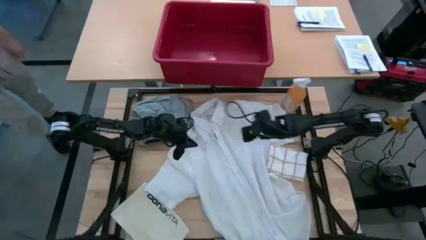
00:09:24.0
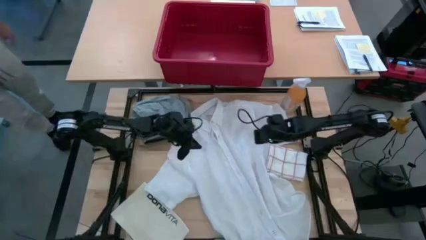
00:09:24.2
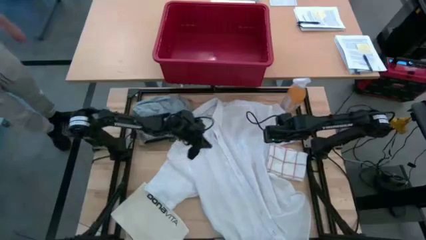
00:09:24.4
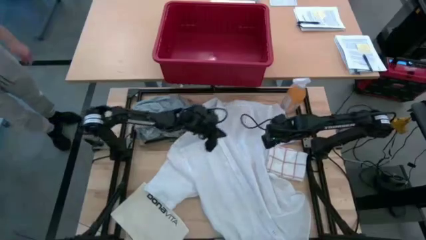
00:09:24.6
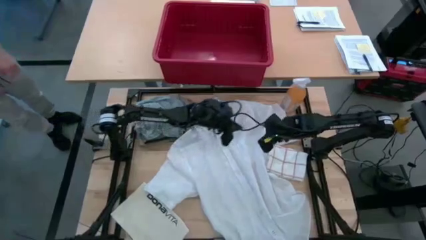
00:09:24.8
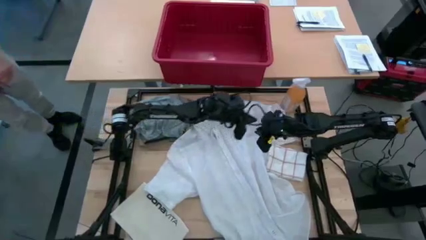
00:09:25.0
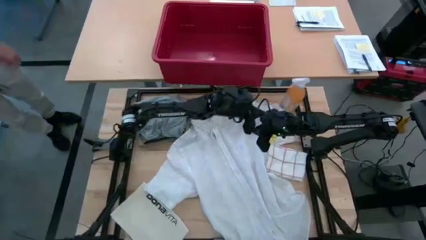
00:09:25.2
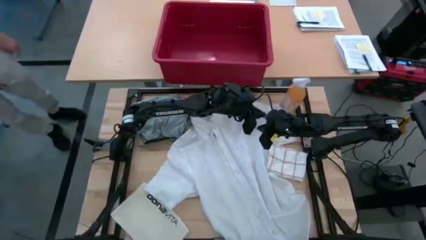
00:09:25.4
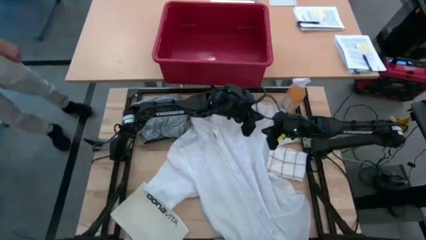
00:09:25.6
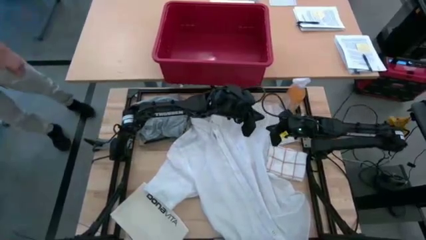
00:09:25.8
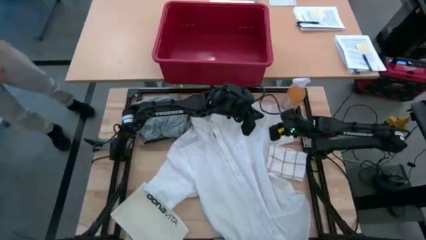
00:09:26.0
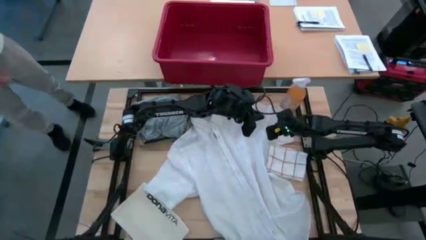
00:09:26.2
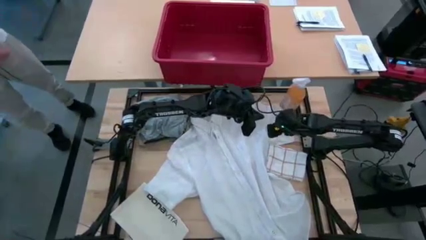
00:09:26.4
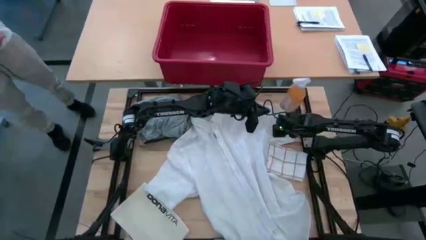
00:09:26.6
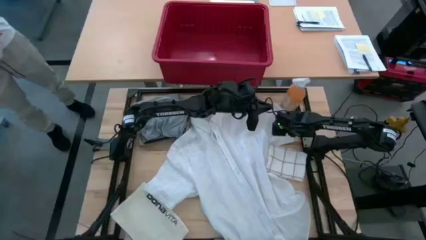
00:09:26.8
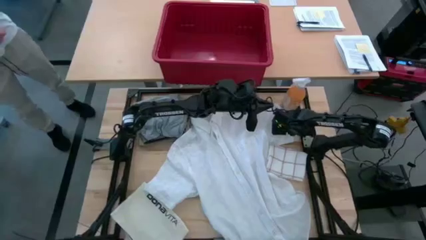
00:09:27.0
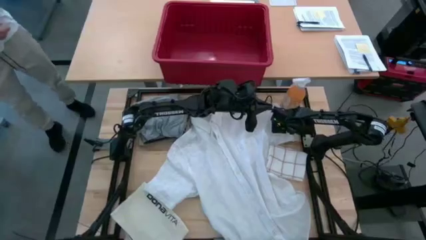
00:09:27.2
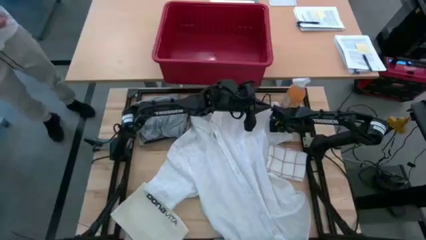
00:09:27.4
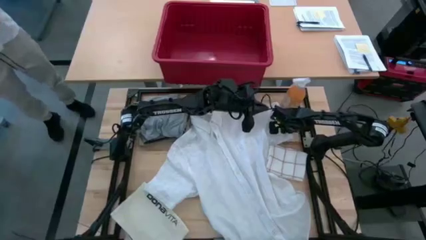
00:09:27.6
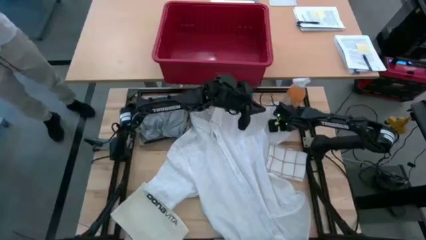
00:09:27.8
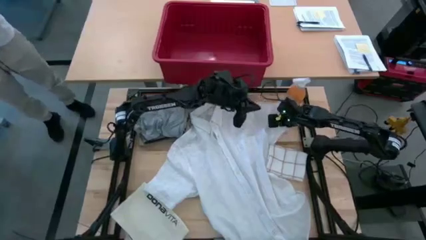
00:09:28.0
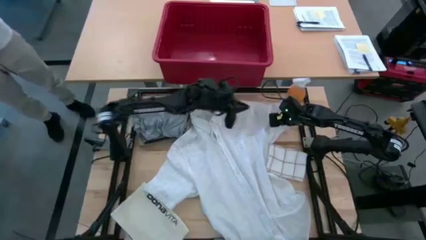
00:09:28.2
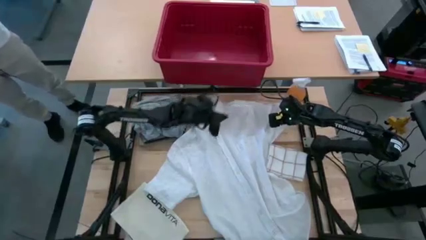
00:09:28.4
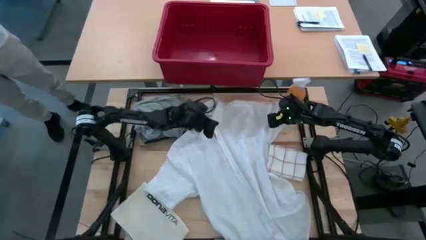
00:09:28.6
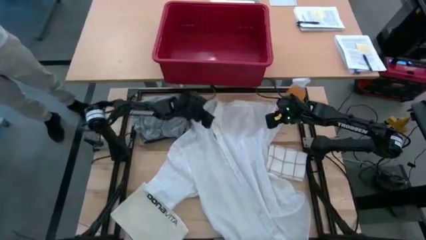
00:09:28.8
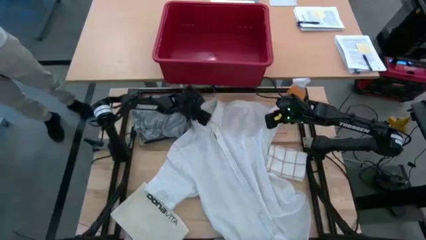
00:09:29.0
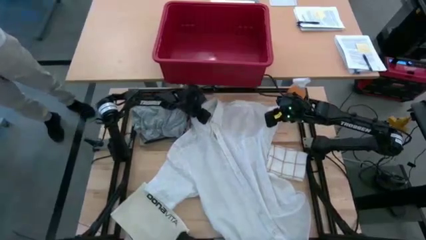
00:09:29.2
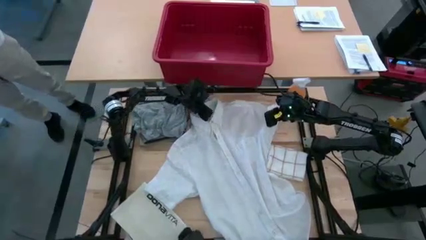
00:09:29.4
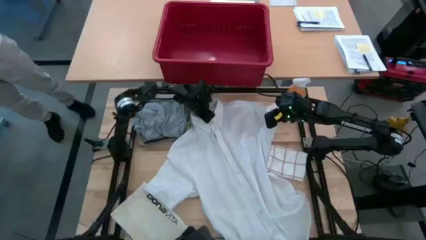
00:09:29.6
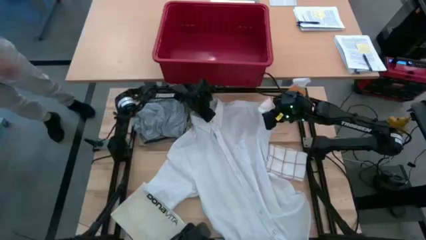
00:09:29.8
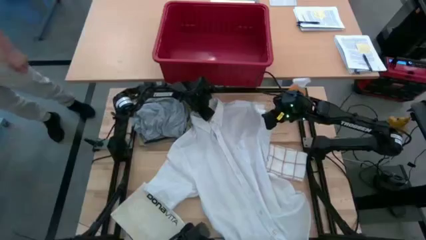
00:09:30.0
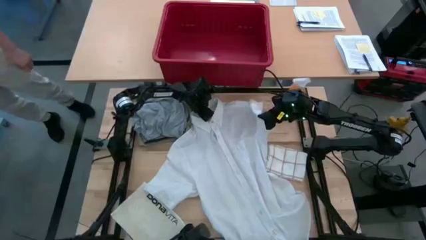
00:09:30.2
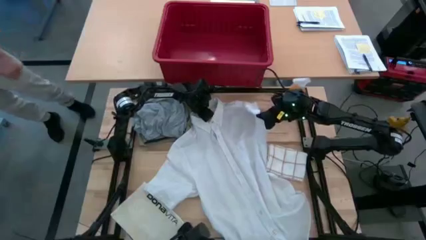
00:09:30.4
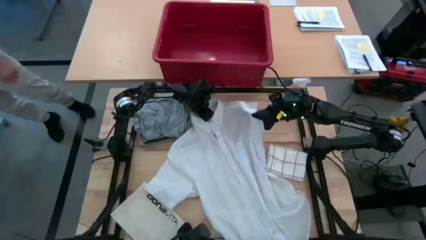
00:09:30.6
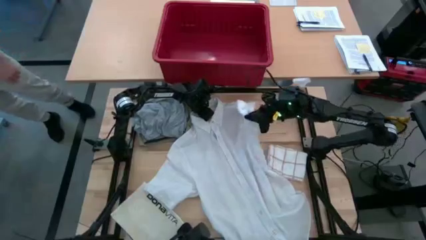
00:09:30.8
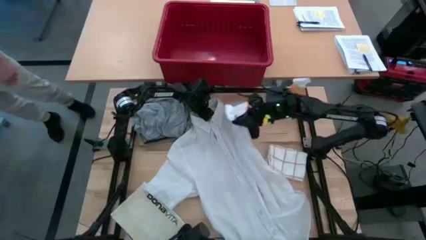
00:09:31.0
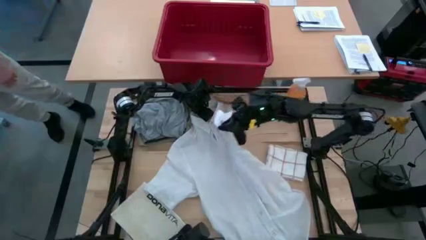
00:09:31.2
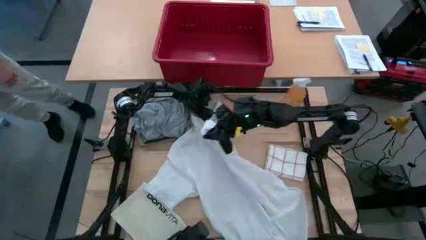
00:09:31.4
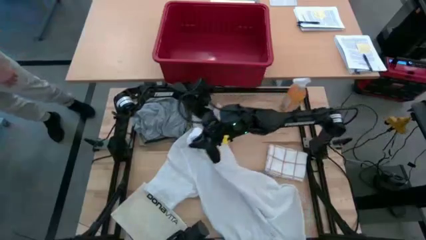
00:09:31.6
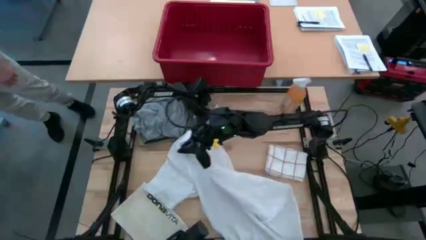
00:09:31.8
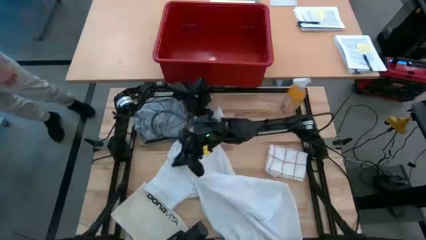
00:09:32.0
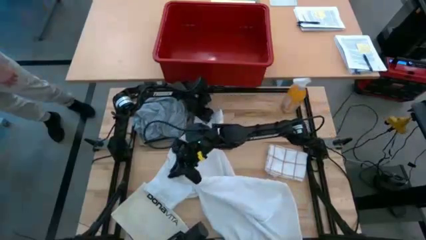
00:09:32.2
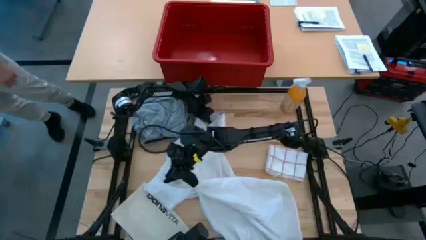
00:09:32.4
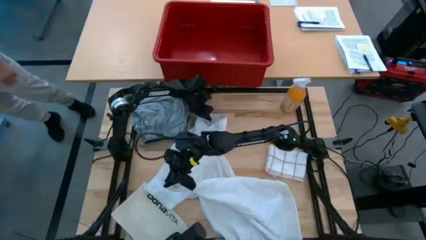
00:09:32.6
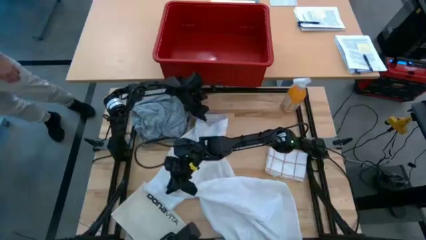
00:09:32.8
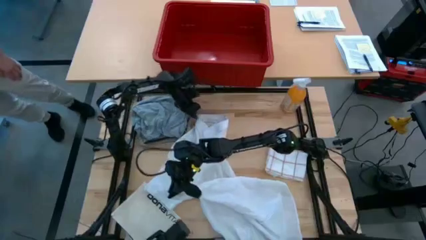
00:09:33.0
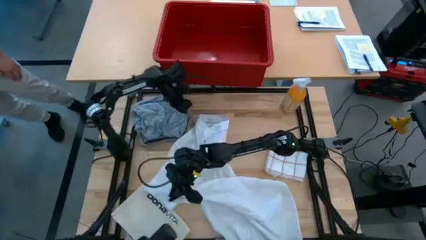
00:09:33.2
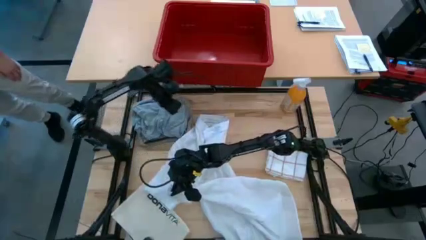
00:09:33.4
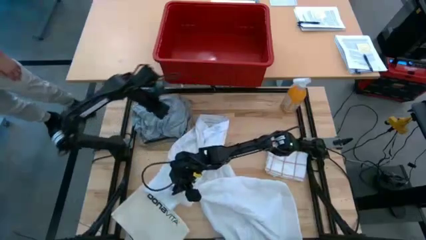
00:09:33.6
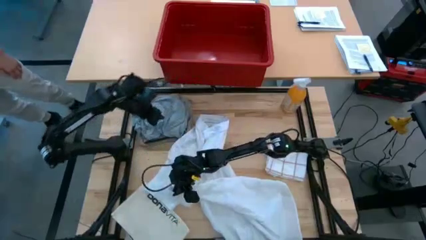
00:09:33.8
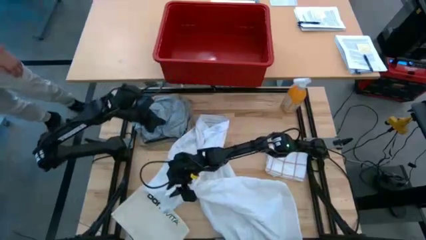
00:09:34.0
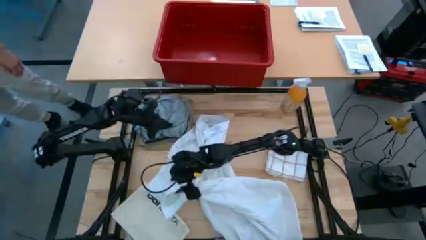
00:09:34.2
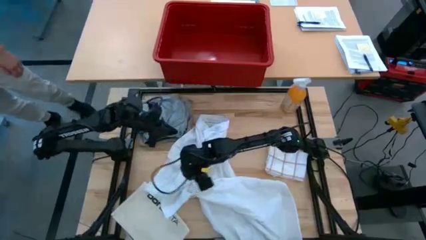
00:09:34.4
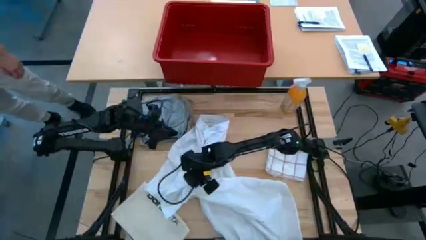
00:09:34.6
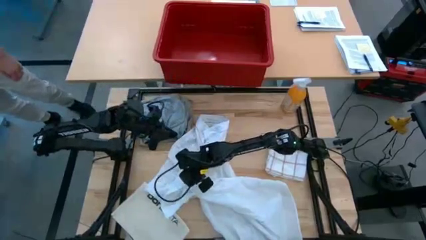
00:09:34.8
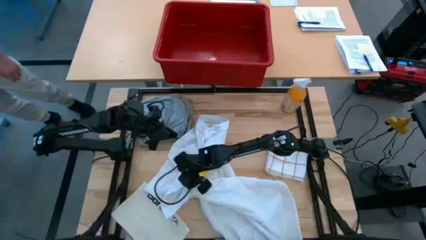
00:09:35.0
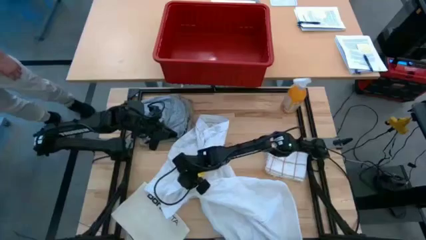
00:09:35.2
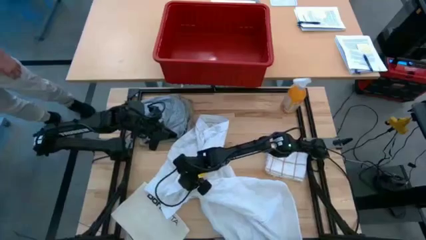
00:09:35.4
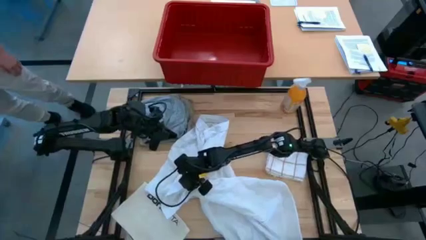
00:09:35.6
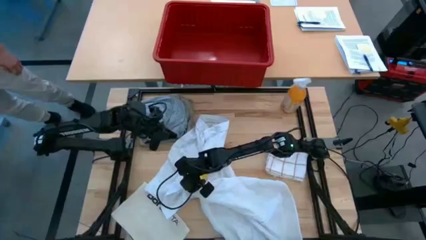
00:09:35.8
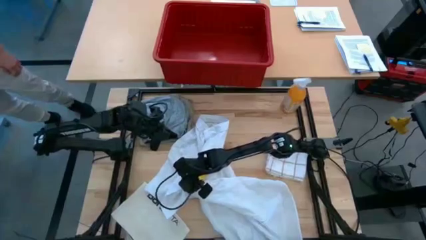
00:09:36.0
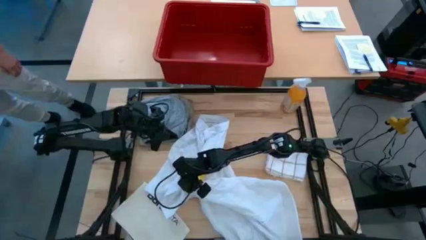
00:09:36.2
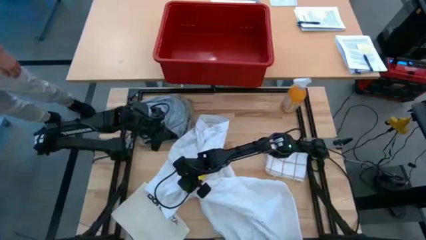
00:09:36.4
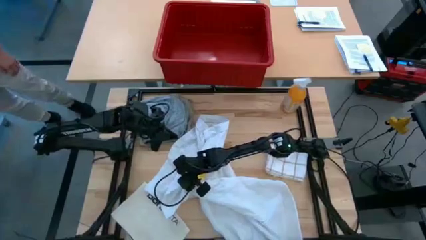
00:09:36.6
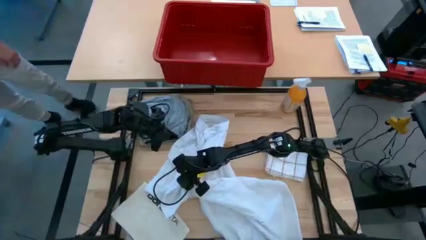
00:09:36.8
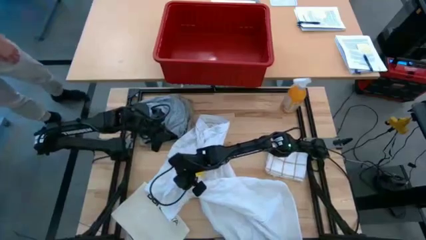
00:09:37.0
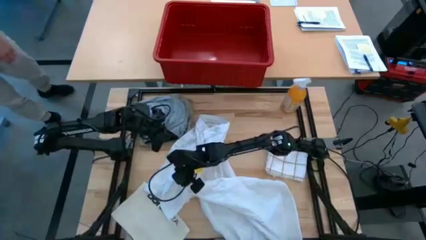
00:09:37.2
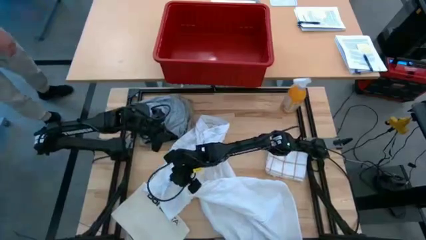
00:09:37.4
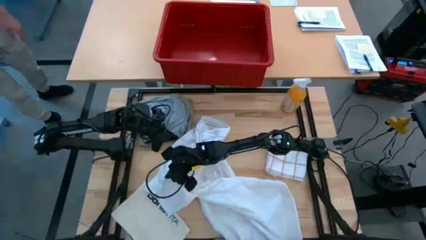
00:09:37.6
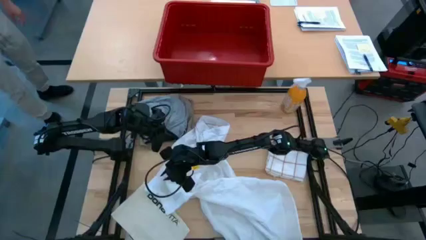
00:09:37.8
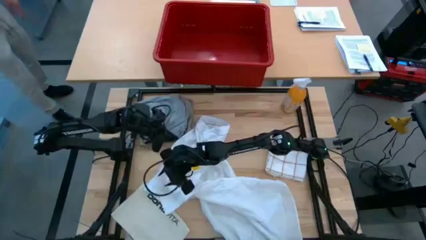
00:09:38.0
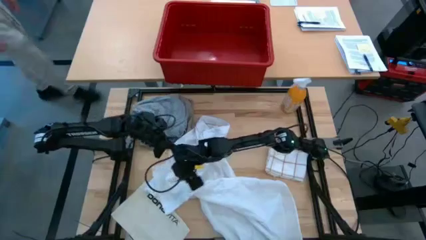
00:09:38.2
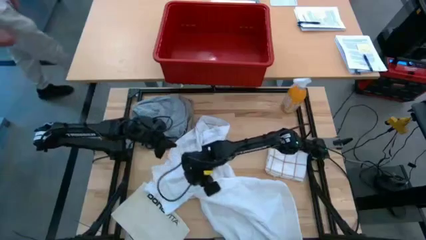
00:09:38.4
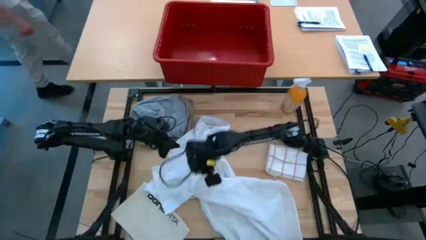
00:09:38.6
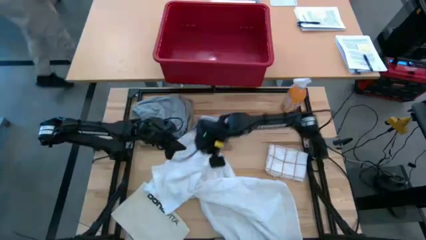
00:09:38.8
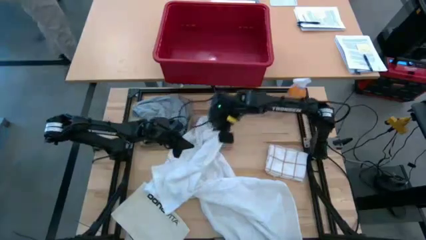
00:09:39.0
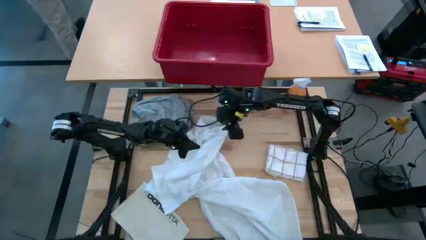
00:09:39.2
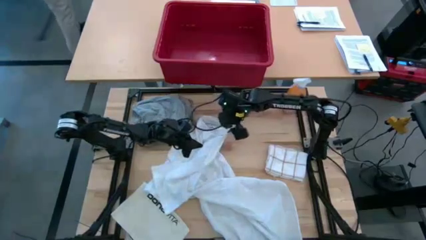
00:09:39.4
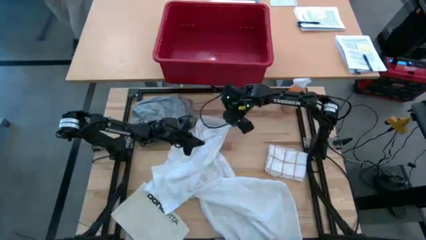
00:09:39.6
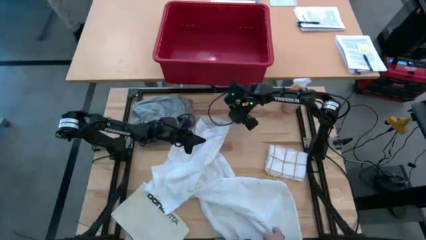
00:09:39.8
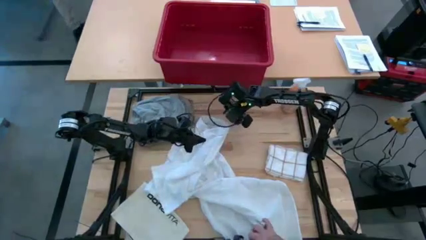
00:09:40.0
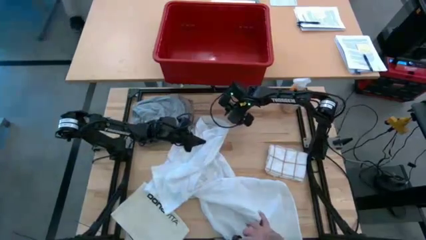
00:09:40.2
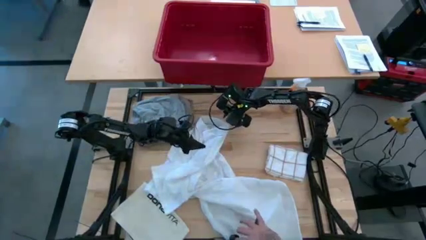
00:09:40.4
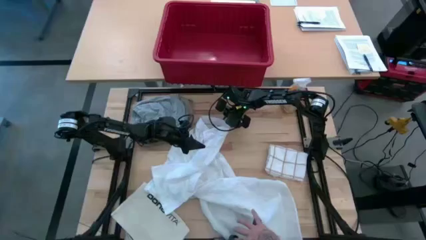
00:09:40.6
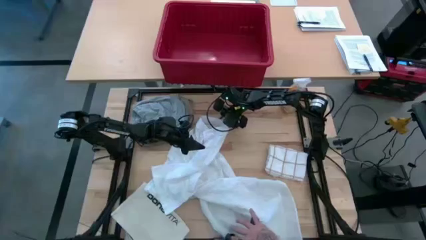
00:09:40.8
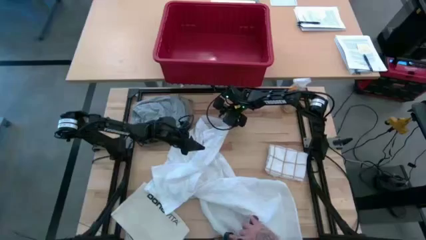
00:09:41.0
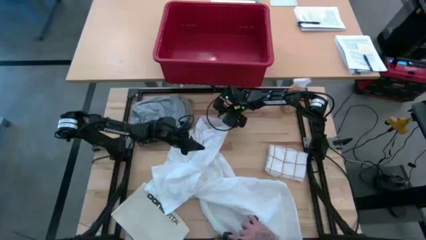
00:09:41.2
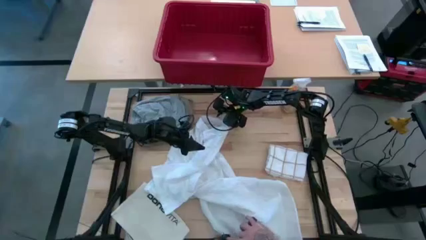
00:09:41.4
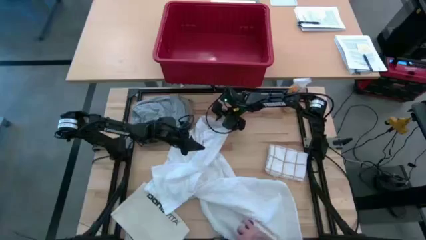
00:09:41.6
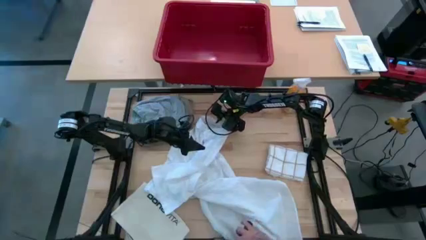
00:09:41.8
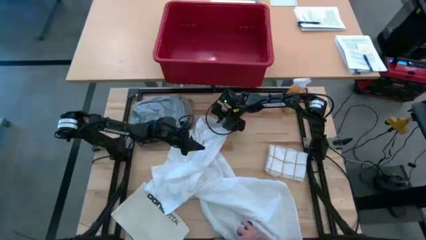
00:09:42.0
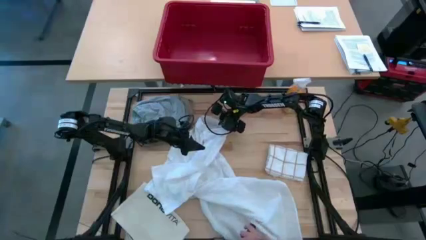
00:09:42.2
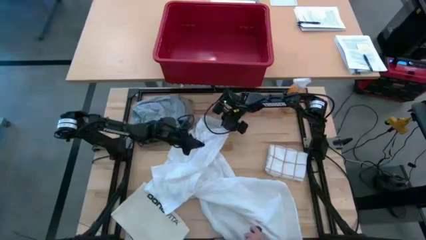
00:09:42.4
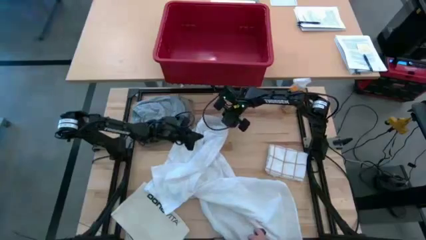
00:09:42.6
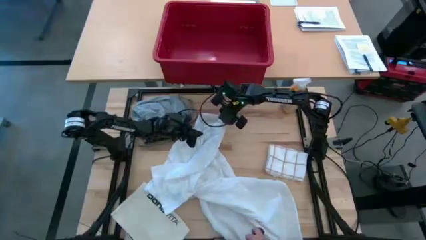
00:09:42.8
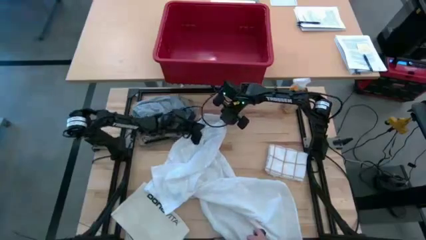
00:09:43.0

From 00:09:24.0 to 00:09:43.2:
Task: Fold laundry
Fold the white long sleeve shirt
